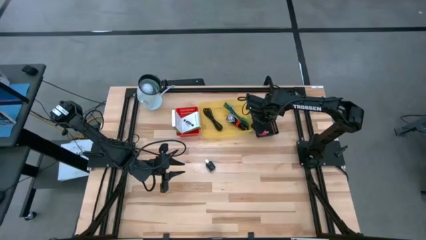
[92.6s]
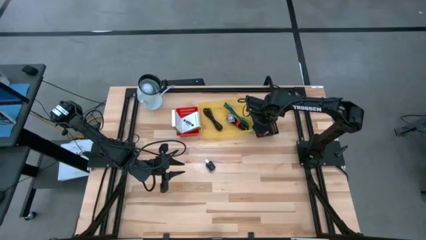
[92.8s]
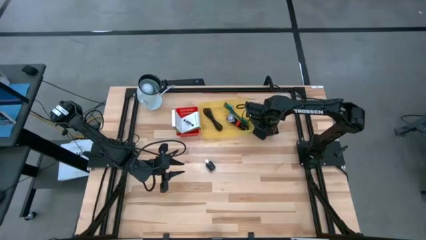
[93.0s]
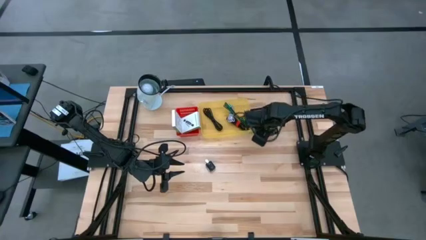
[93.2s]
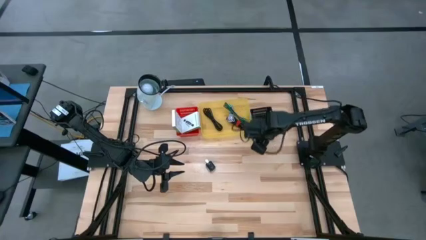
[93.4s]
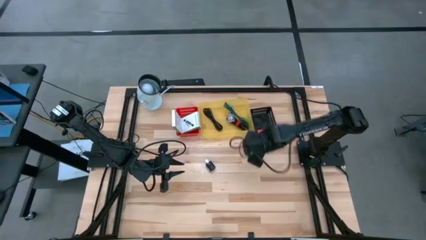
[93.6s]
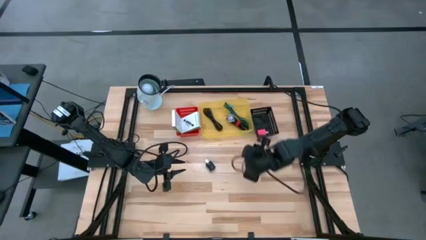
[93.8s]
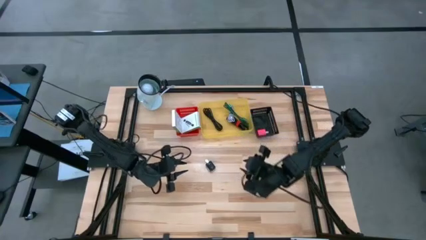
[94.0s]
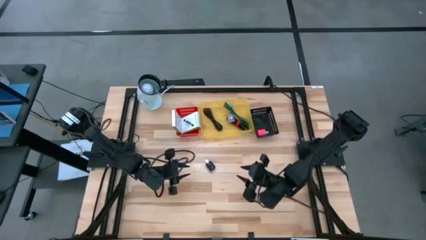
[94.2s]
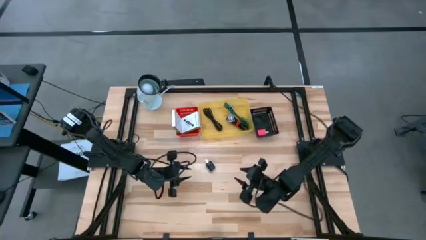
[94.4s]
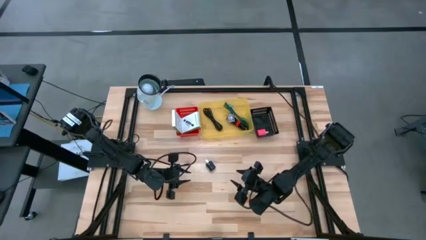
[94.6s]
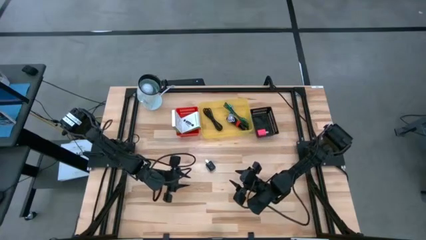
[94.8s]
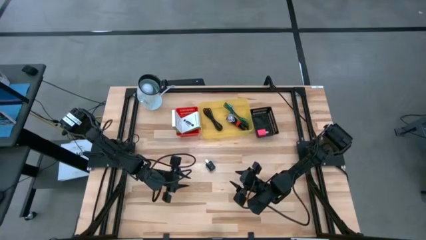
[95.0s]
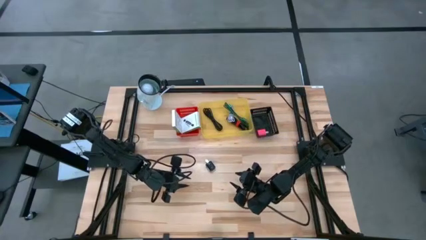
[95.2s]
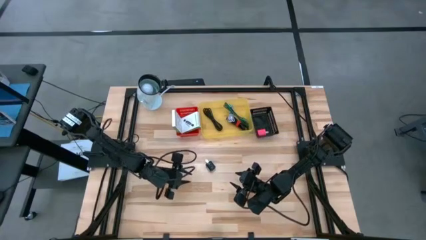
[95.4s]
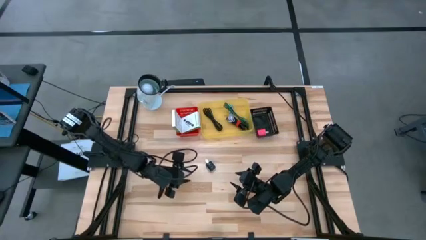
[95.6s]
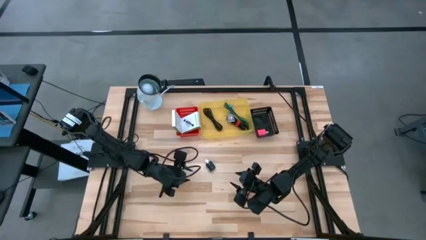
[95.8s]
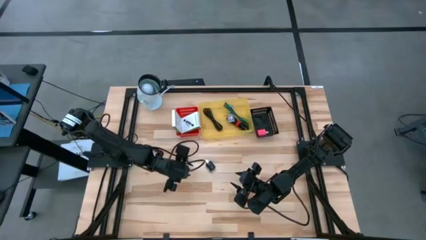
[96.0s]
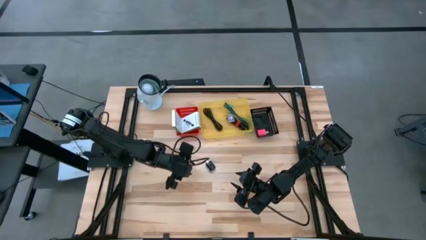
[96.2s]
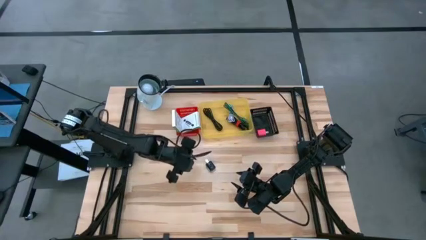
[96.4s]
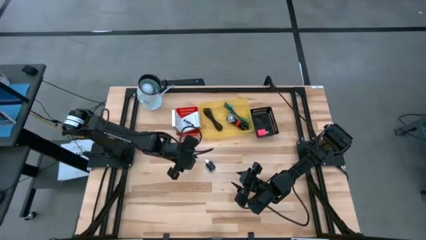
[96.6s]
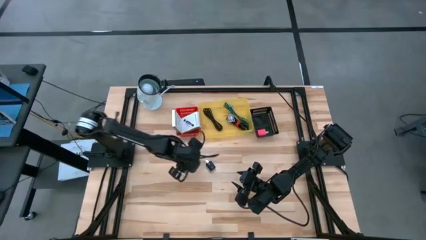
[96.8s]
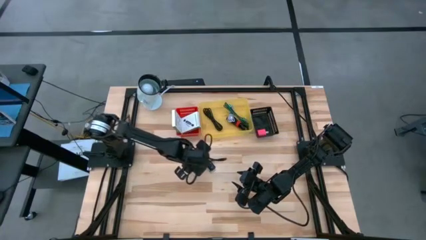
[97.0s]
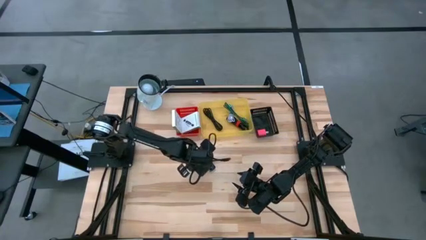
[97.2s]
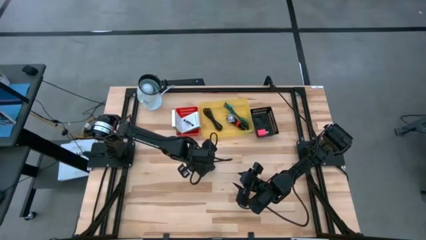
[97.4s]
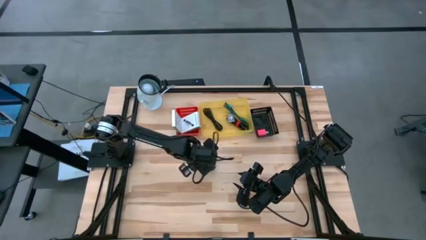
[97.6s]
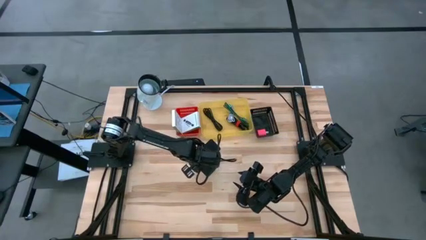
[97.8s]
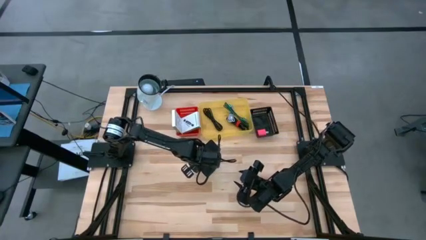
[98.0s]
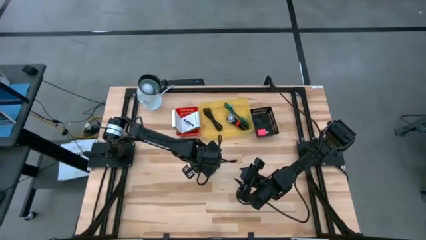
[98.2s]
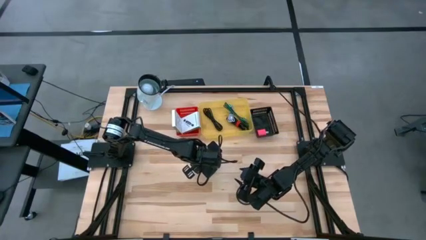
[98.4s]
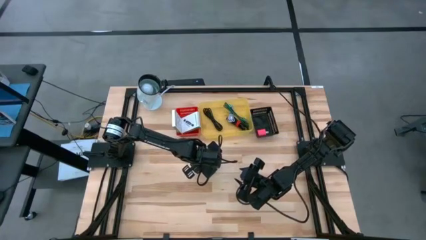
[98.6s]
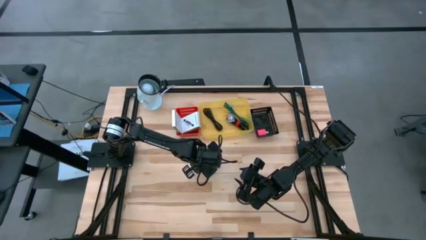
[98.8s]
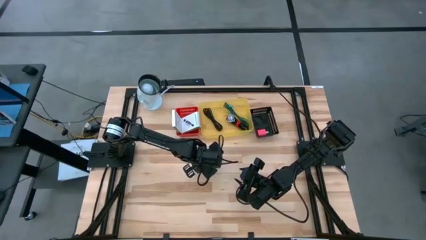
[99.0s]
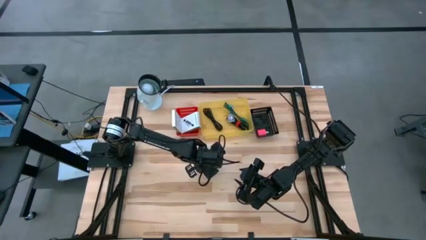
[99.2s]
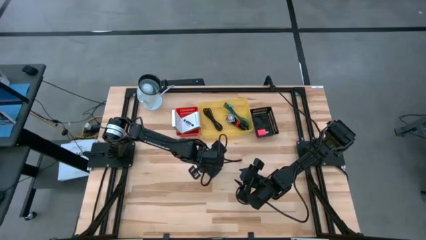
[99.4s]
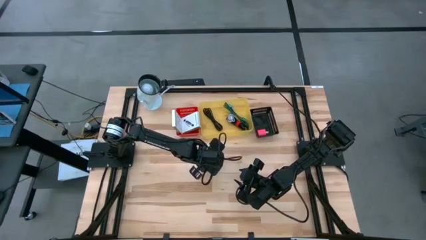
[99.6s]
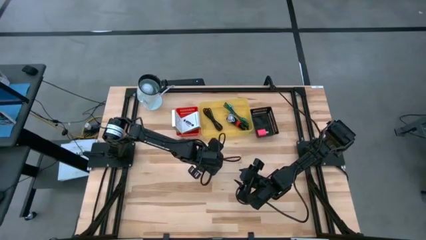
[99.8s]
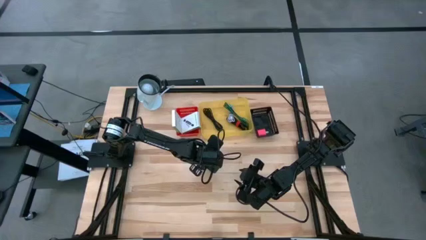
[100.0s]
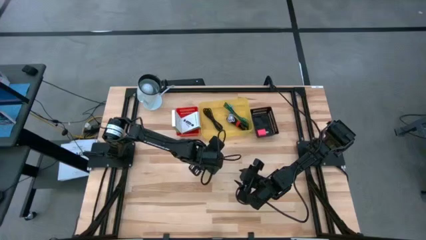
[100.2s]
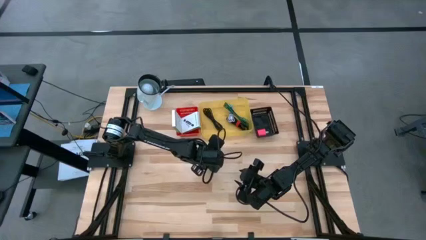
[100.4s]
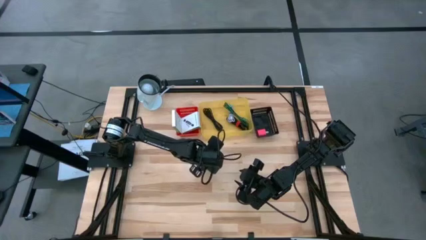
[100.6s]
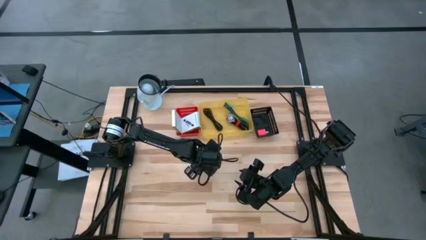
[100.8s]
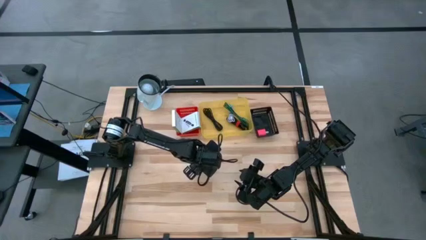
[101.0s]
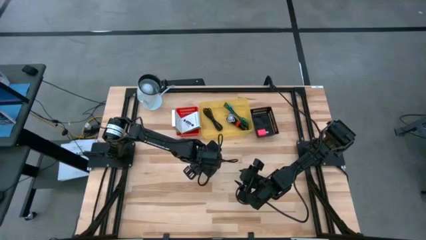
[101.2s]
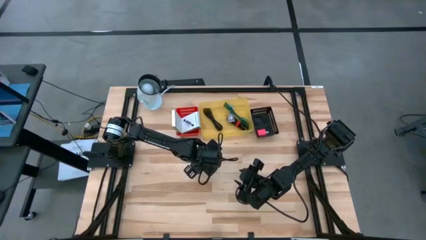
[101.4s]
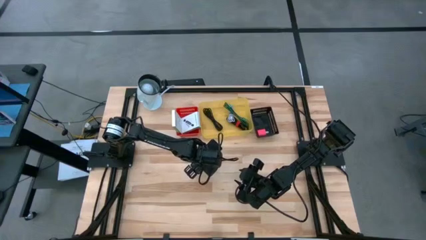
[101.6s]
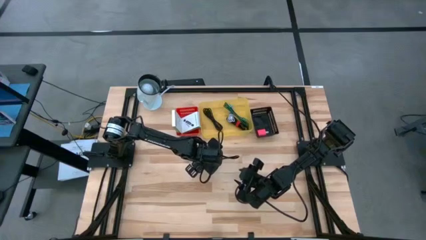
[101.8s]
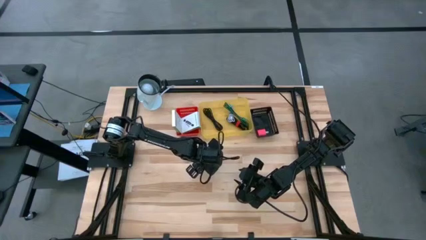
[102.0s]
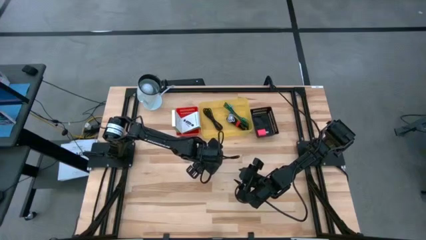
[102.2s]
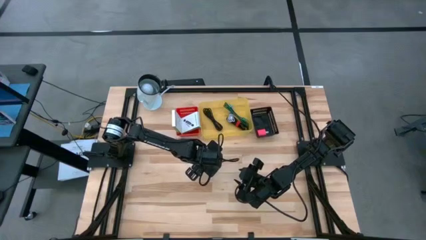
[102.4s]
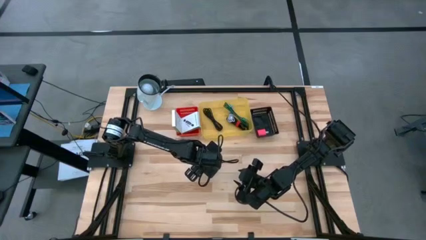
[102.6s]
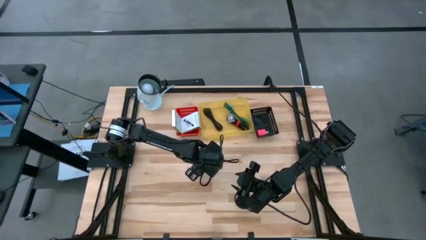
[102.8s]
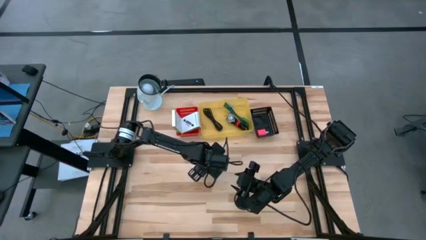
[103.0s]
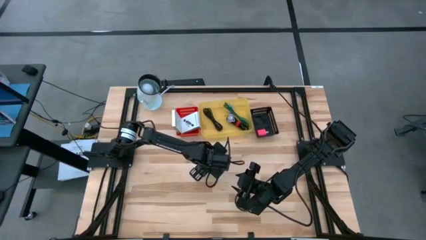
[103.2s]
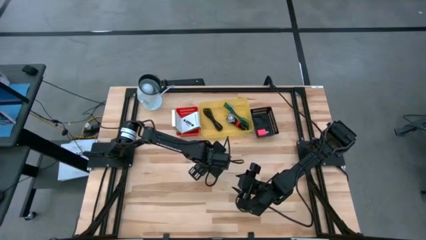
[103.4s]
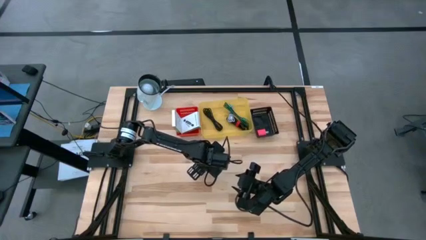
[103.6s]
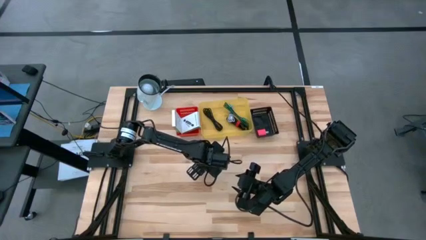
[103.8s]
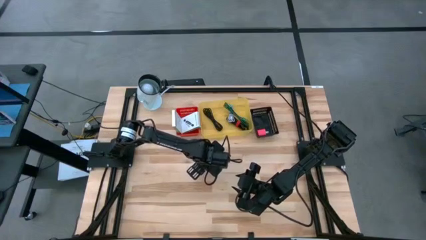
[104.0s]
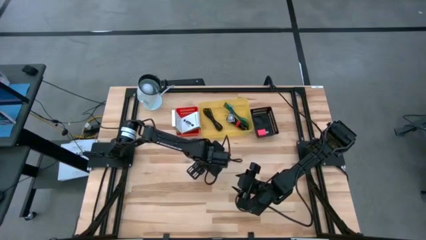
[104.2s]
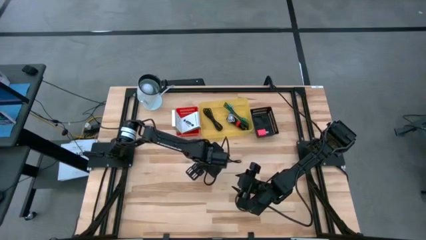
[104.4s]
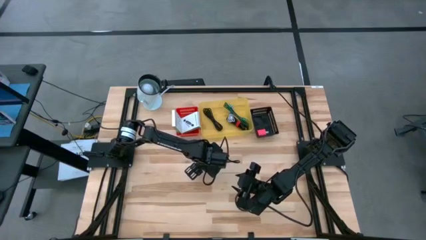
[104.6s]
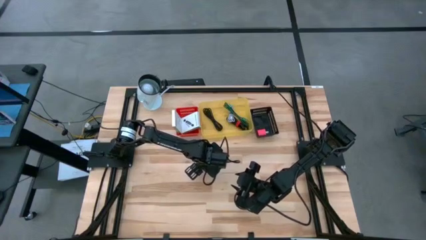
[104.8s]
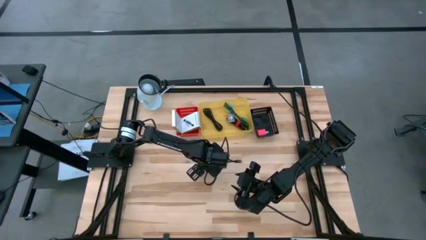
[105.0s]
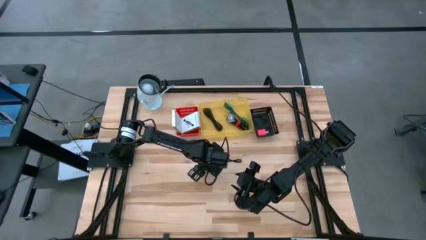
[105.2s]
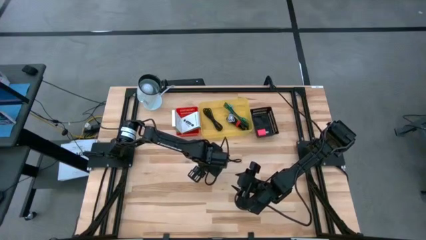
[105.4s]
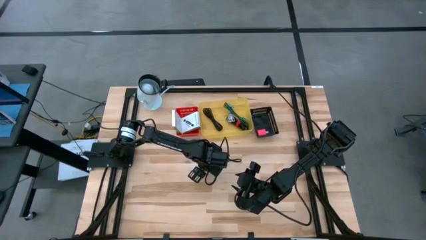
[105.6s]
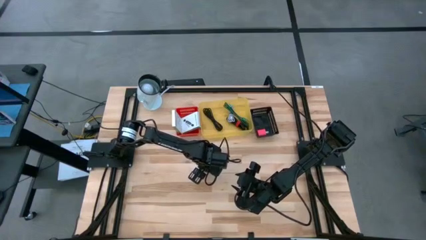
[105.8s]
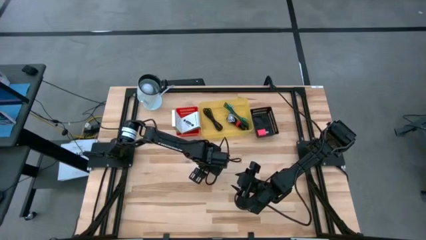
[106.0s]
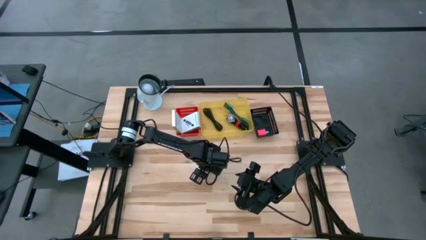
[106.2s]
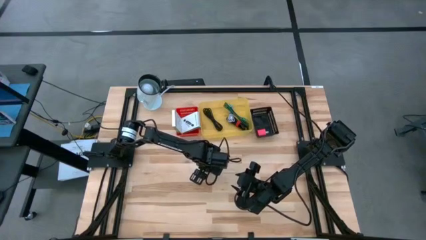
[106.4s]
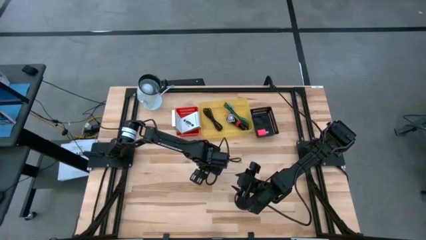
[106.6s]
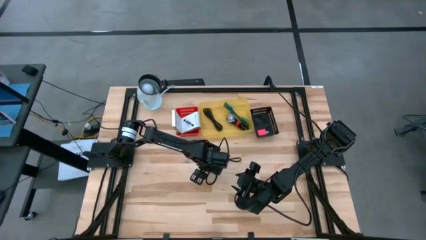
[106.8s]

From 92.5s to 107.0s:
Task: Pick and place items into bin
Put the black charger adapter into the black bin

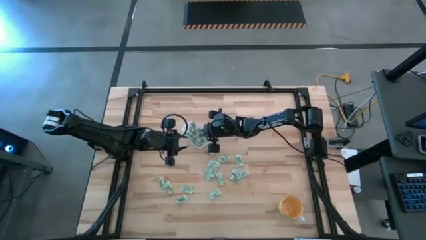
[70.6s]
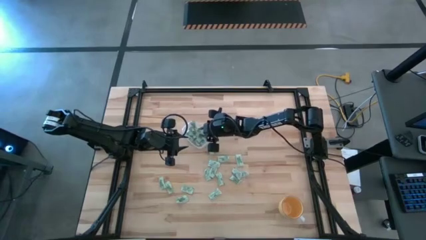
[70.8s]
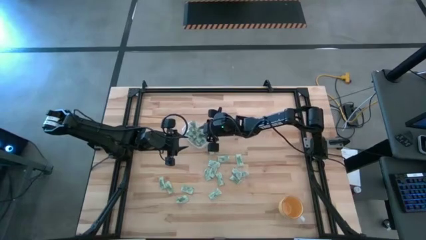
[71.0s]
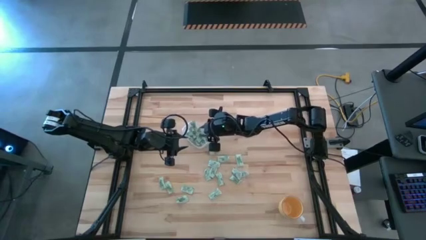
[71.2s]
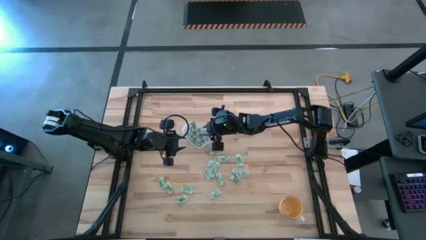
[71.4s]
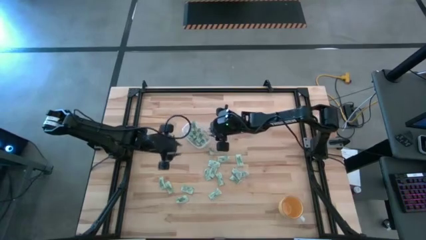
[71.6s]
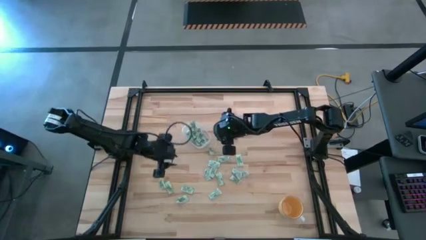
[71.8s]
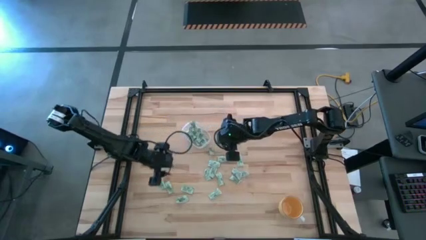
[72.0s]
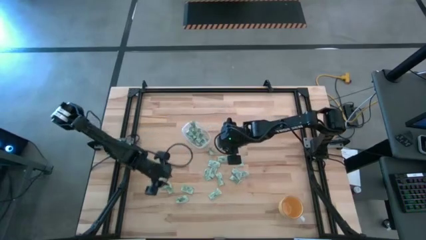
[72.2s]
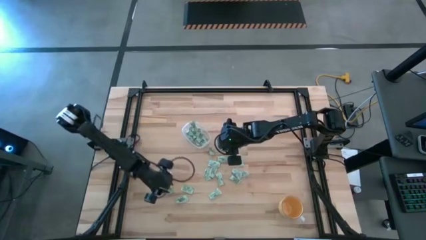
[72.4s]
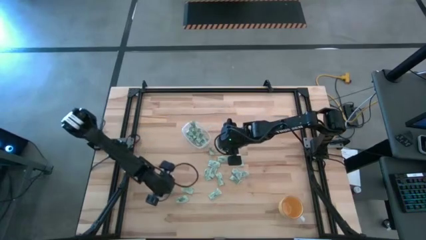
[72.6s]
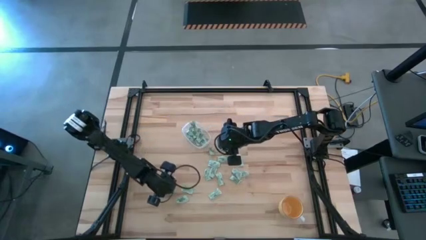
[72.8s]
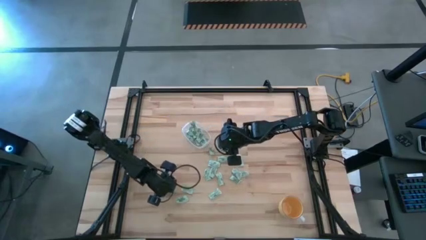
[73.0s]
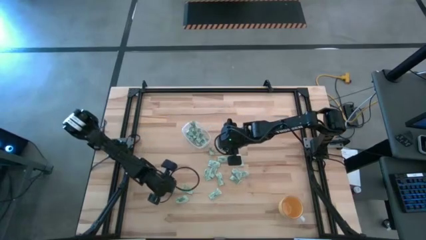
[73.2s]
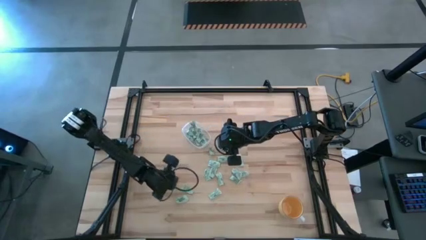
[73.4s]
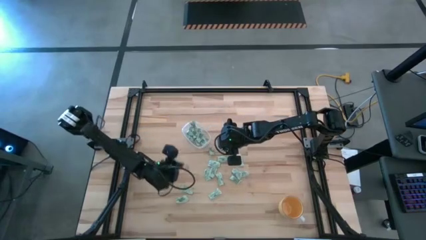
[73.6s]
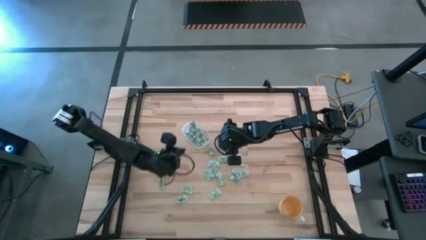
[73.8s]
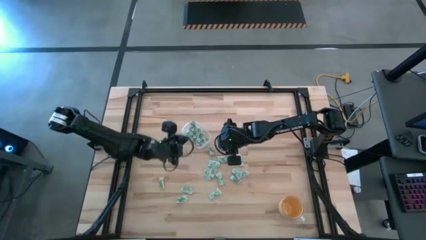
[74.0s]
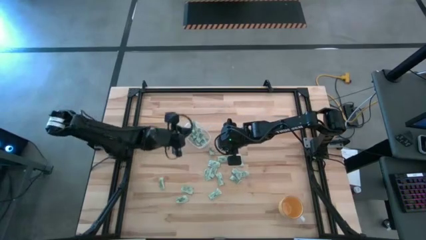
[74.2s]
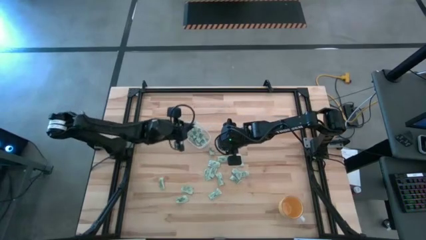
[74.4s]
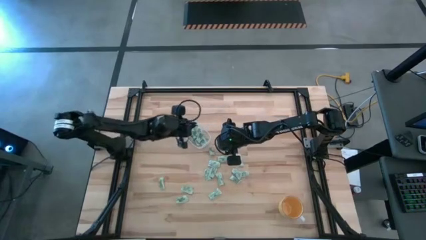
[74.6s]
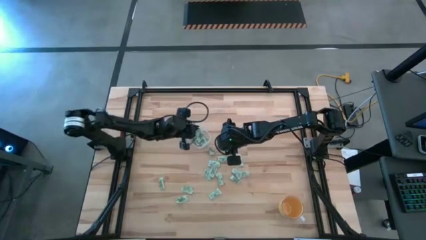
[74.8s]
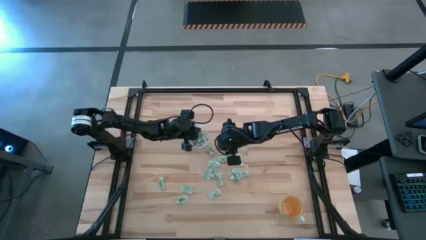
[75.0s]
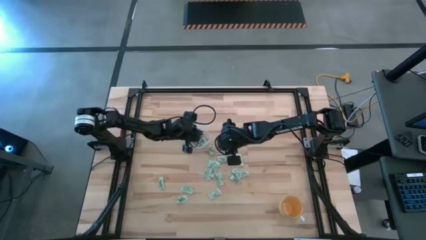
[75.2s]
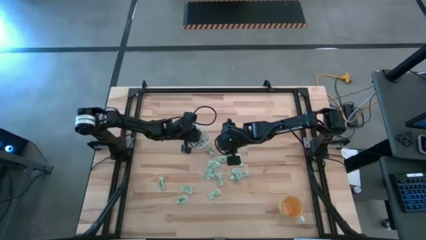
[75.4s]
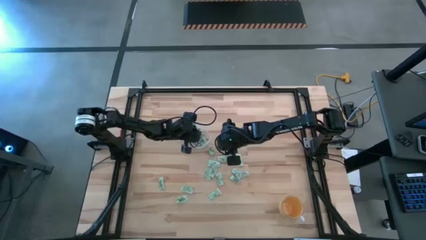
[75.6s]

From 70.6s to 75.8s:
Task: Pick and place Stevia / Truvia into bins
Put the stevia packet into the transparent bin
